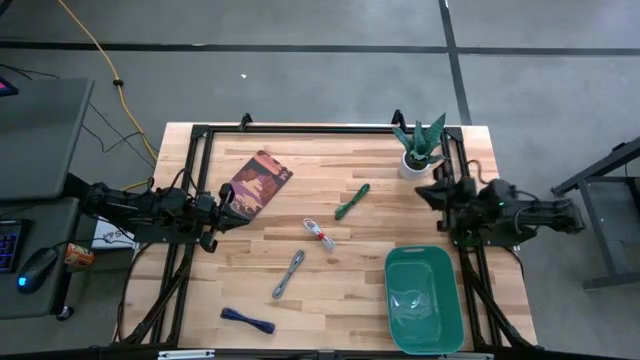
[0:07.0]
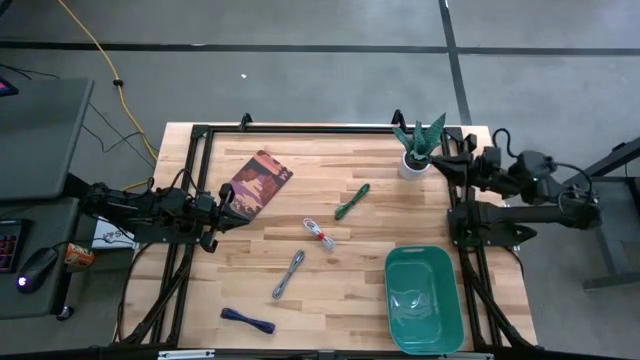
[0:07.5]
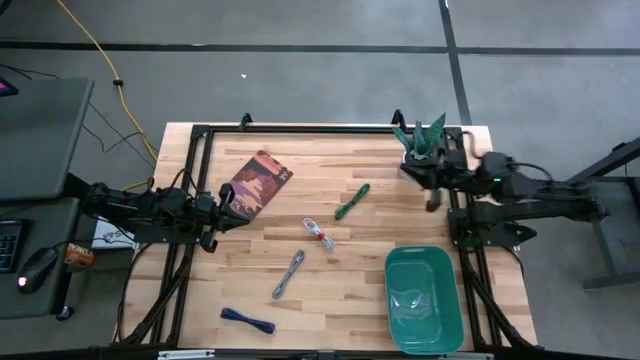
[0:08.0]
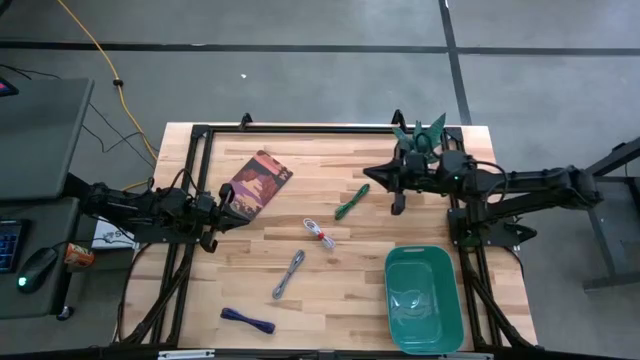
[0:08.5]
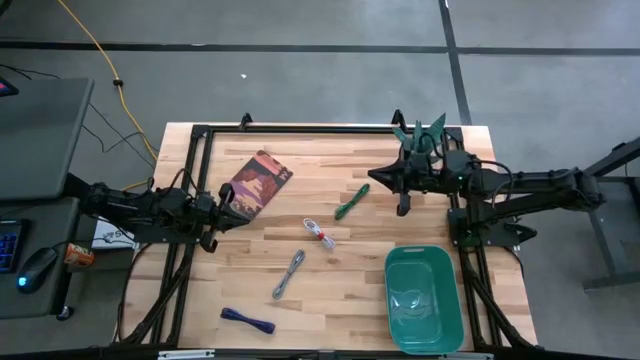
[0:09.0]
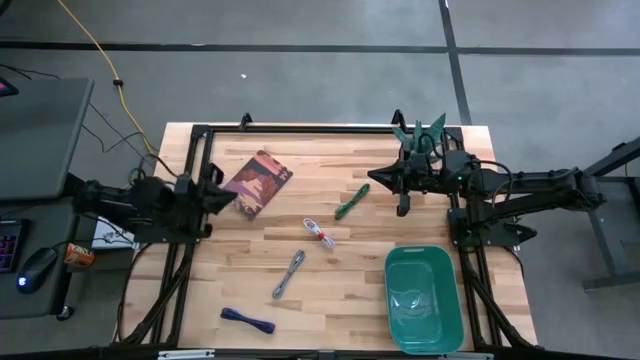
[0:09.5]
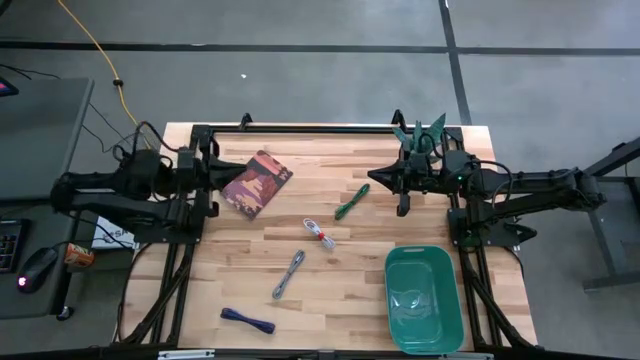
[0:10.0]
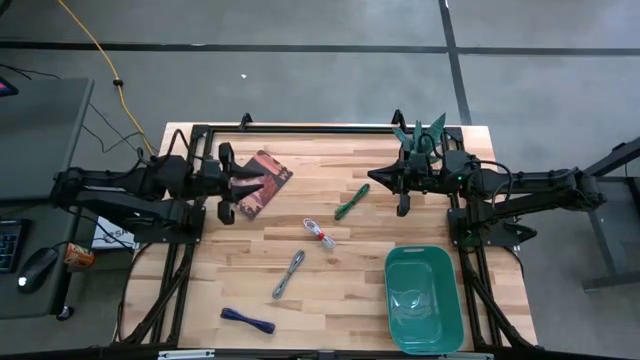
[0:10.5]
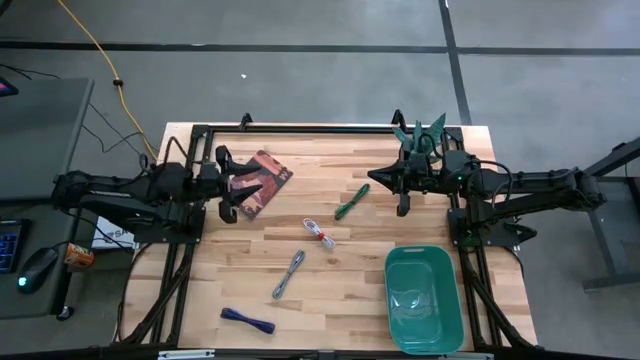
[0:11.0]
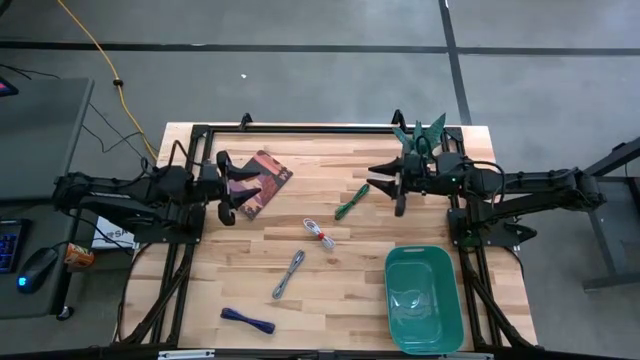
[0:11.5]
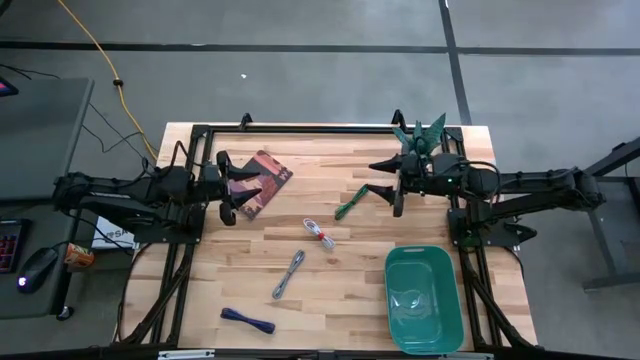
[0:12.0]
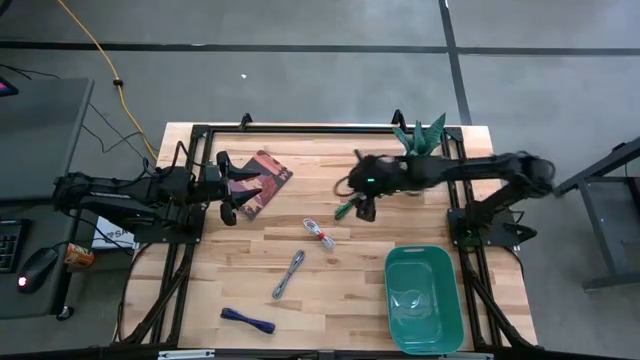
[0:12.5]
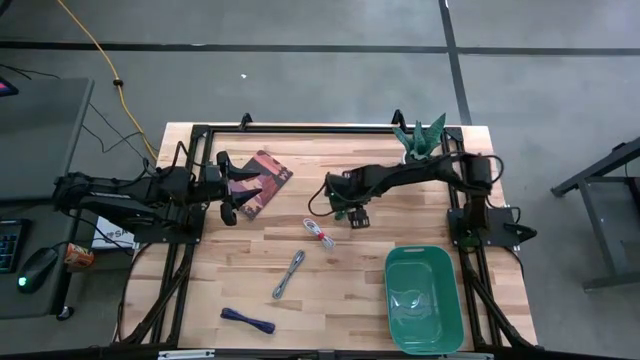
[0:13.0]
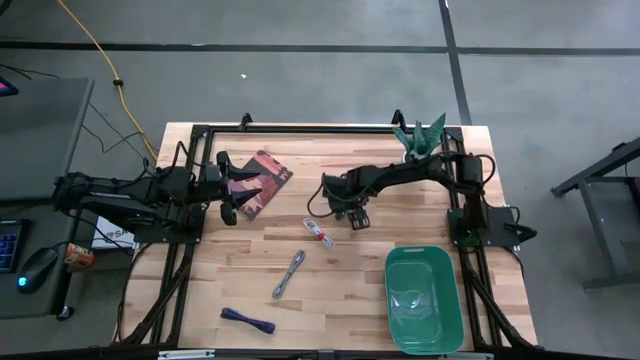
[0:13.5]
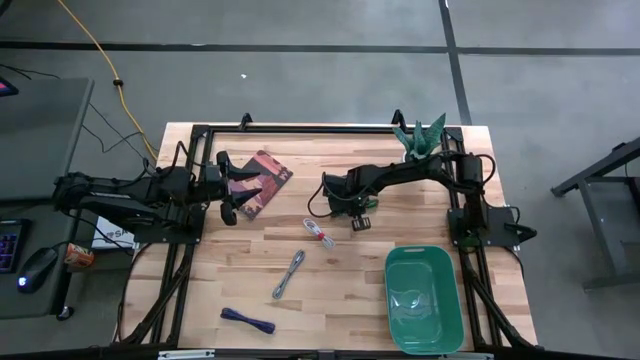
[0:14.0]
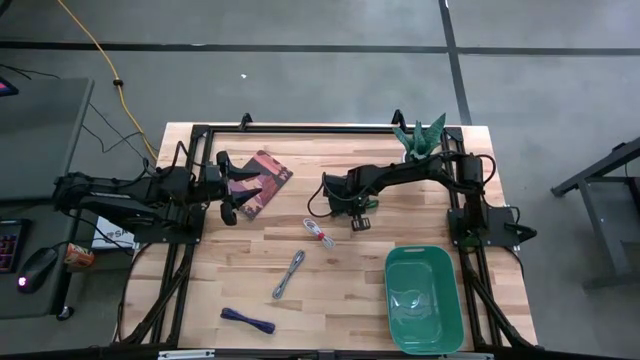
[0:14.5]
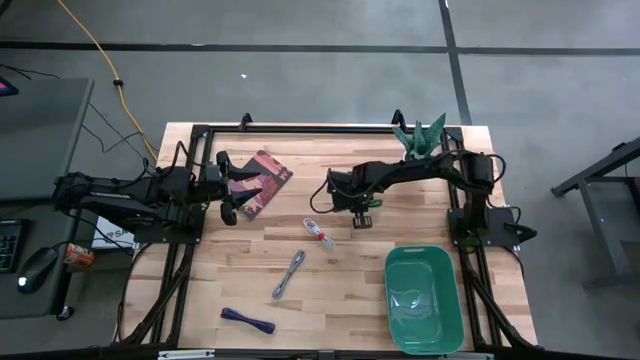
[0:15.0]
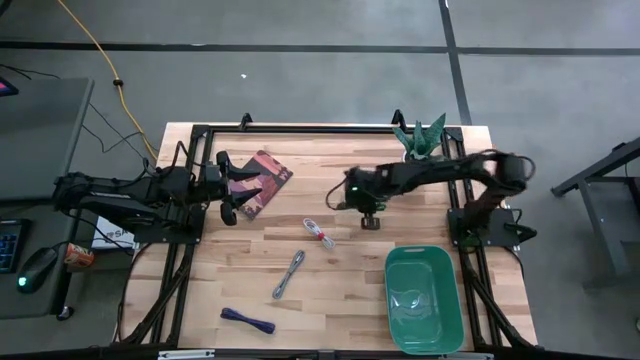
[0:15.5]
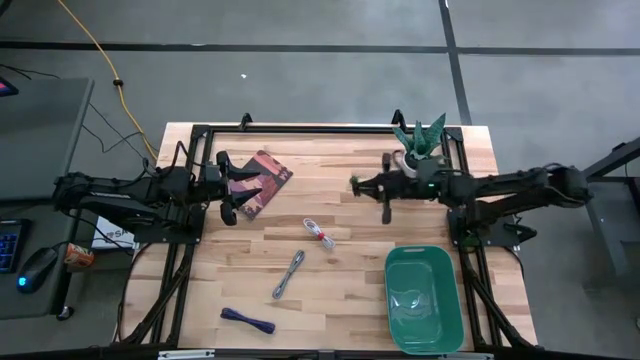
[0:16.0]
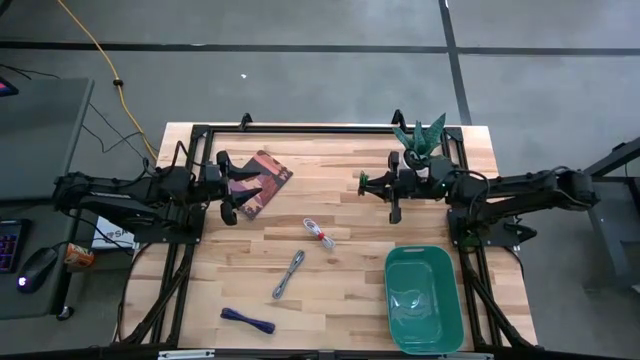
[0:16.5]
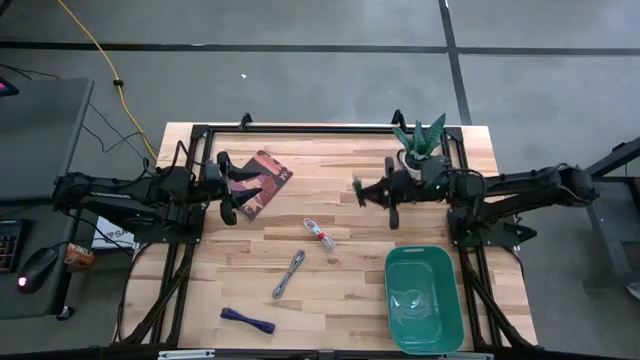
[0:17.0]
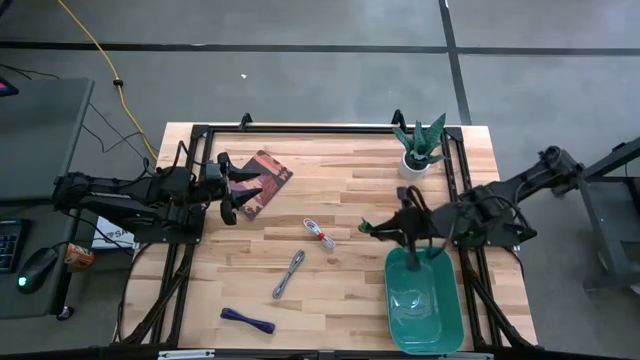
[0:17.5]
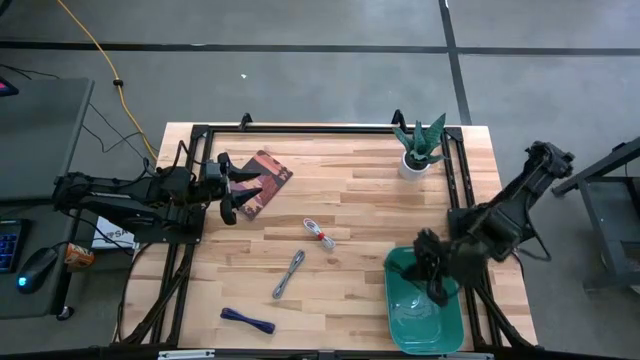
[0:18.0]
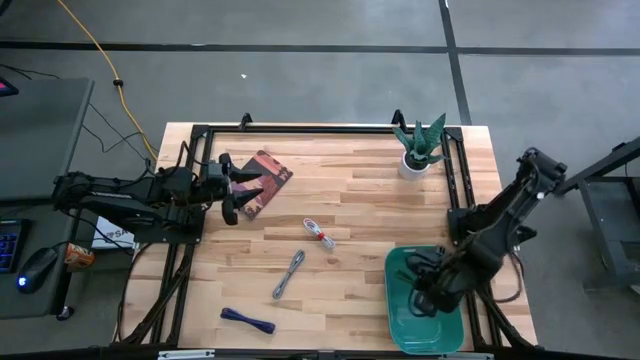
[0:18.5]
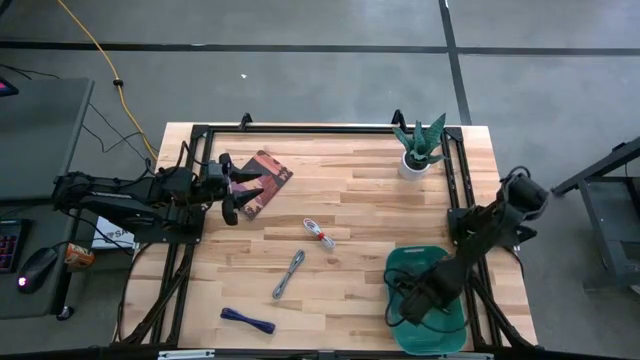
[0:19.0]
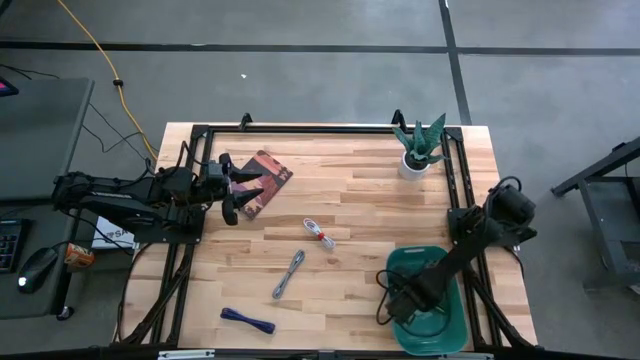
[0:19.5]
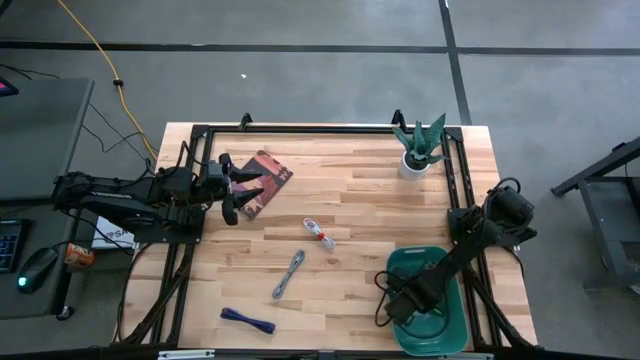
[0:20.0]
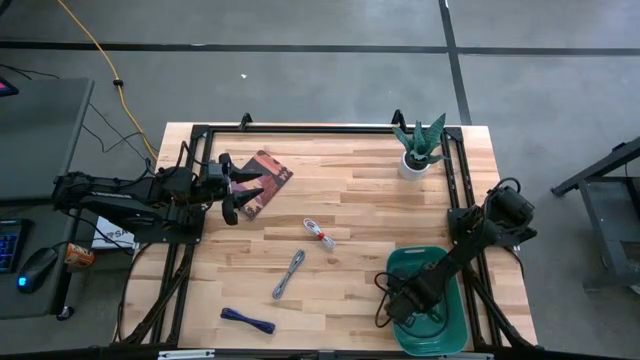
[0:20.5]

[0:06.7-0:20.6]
Task: Pick and place USB-C Cables
Put the black green USB cable into the bin

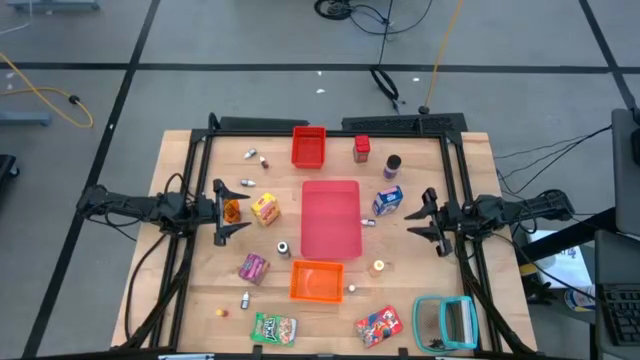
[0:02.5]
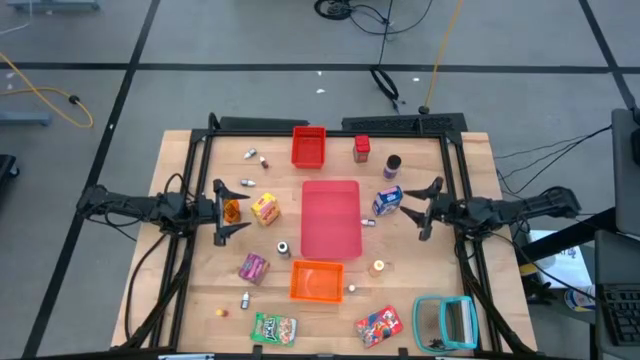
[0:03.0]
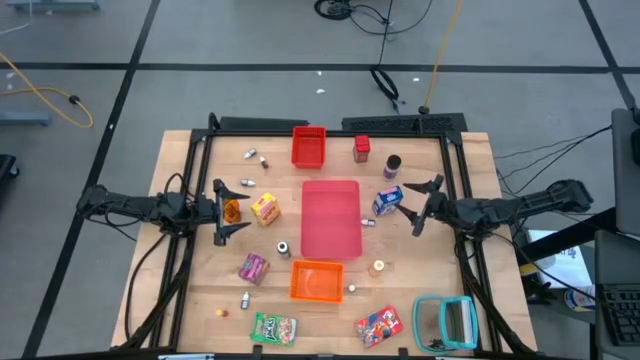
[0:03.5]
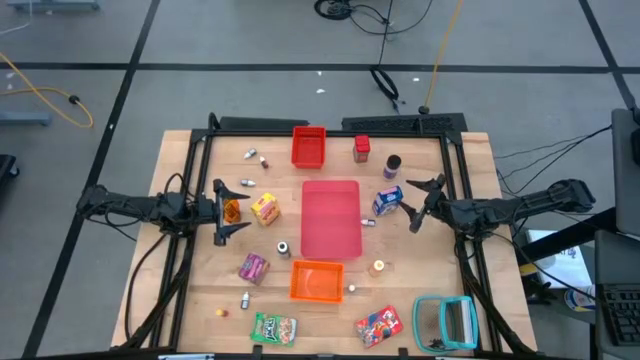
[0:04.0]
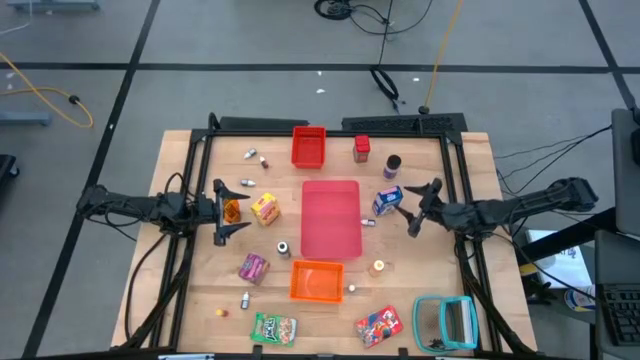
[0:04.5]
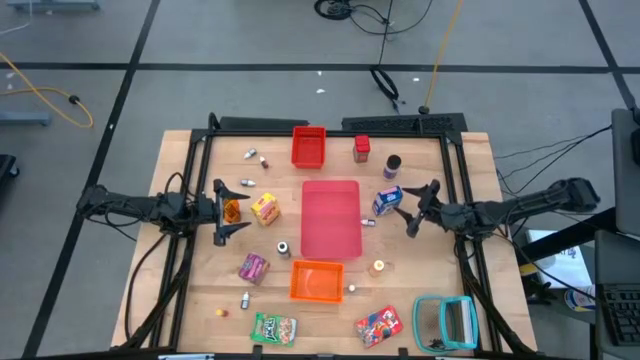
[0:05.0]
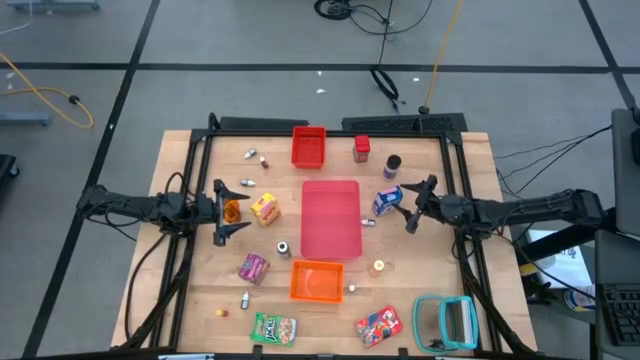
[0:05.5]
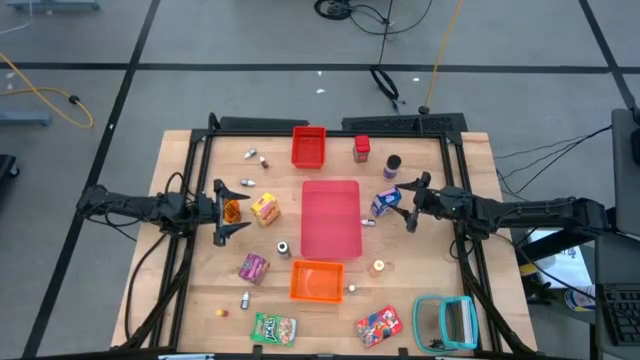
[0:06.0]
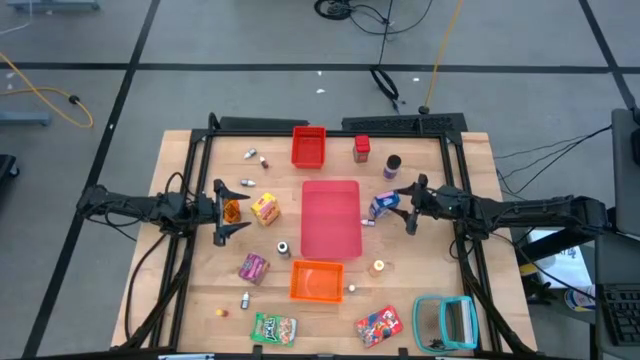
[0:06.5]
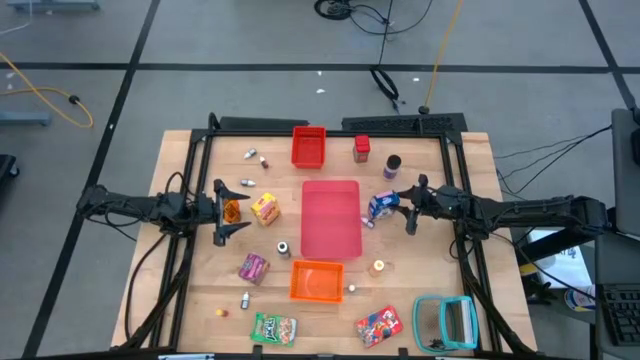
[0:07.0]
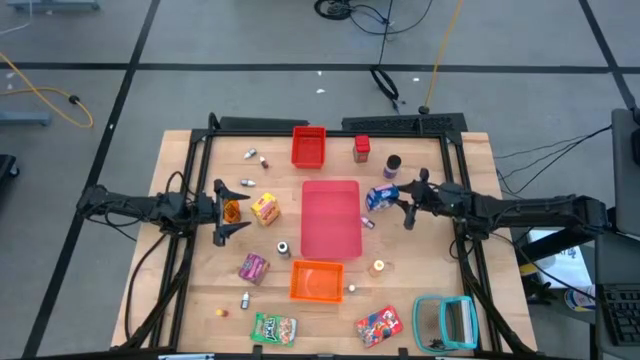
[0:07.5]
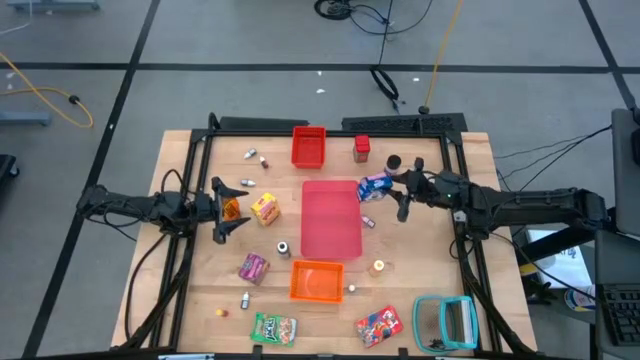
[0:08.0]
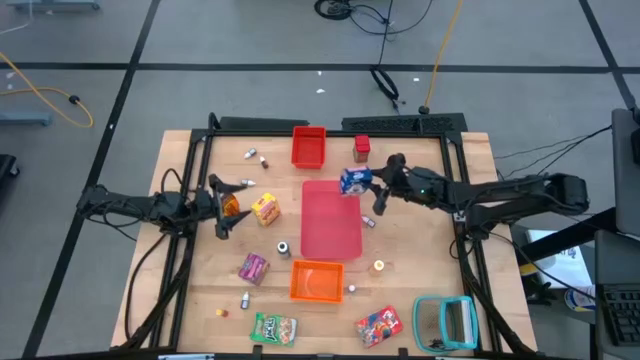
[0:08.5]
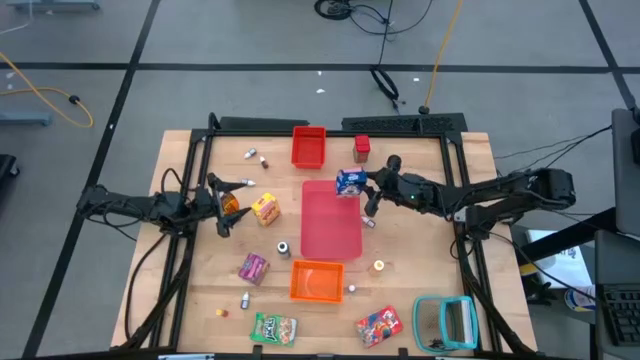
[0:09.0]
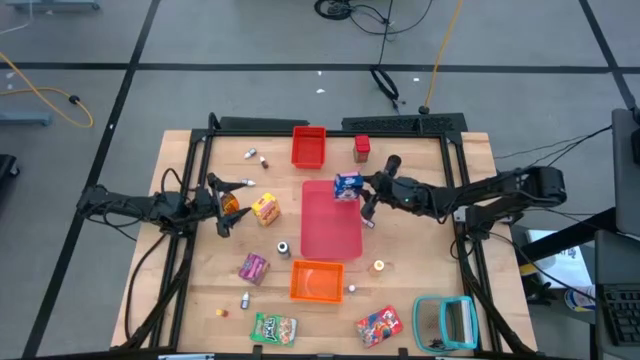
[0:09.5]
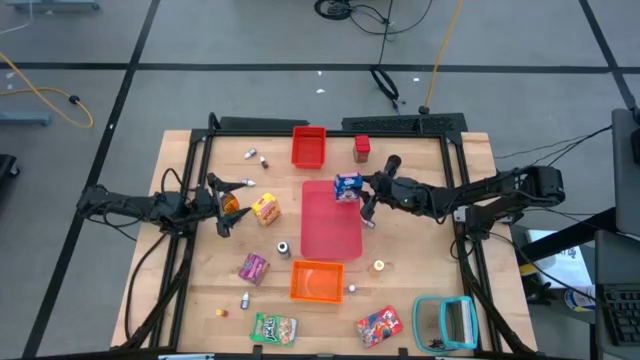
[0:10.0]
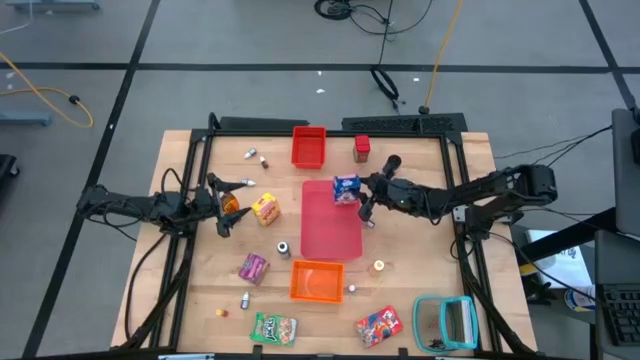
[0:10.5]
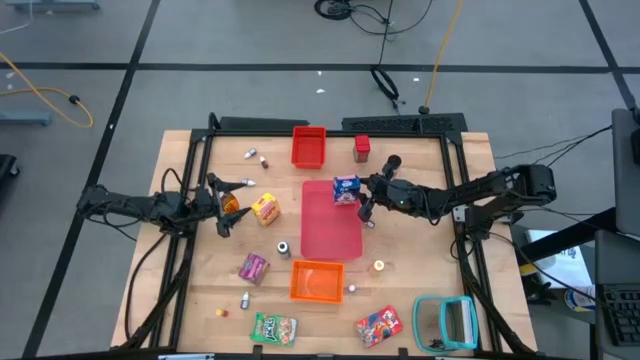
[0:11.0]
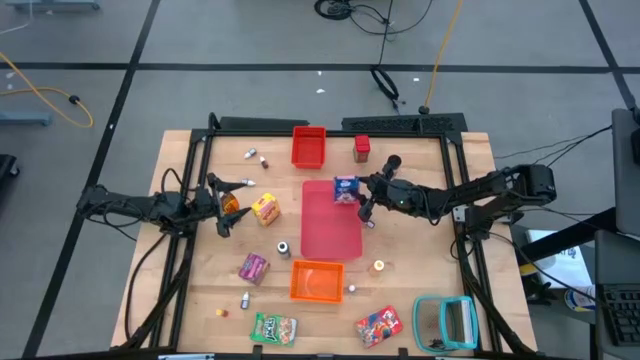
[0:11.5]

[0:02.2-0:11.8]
Task: Pick & Place Kitchen Items
Put the blue cereal box into the pink bin
